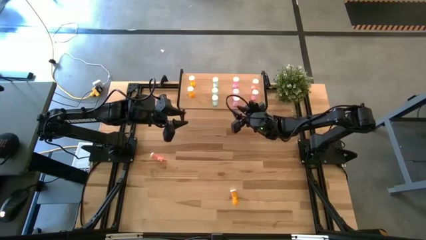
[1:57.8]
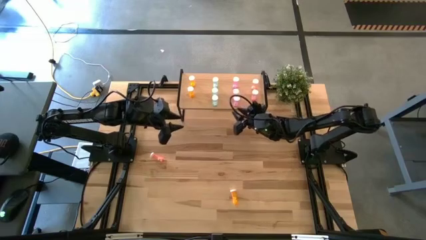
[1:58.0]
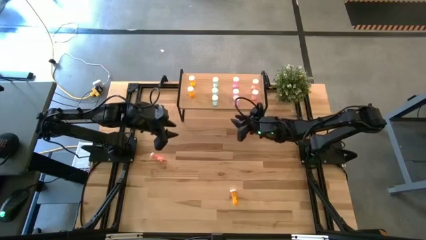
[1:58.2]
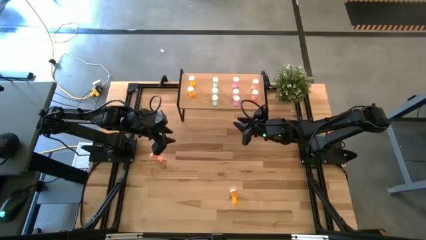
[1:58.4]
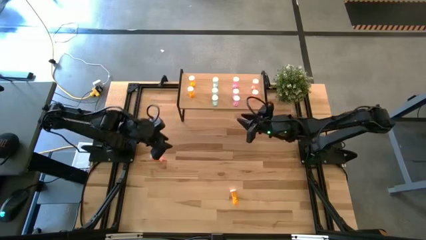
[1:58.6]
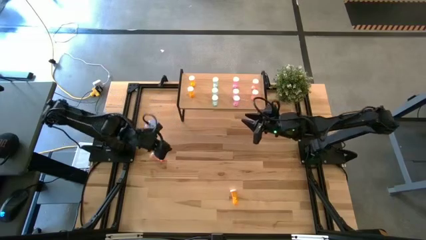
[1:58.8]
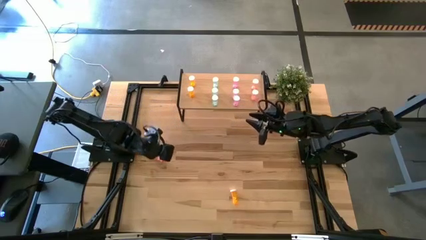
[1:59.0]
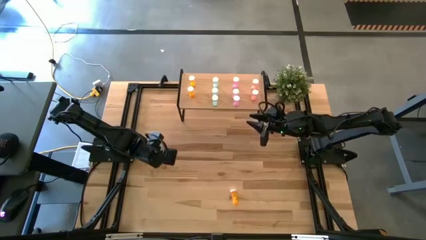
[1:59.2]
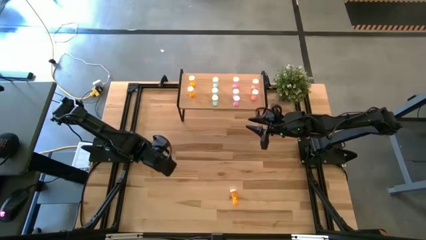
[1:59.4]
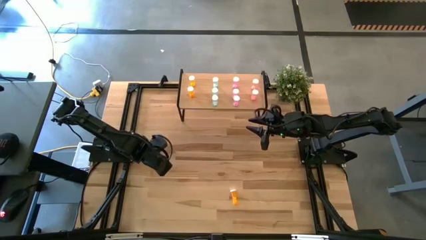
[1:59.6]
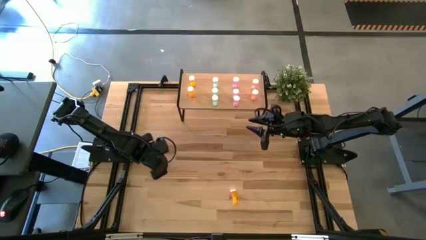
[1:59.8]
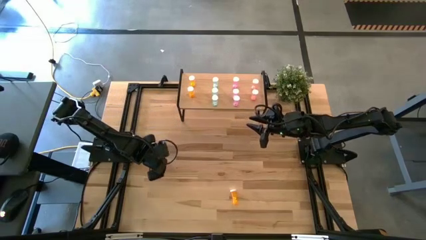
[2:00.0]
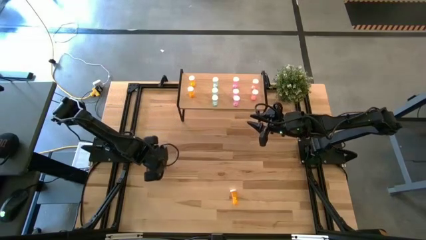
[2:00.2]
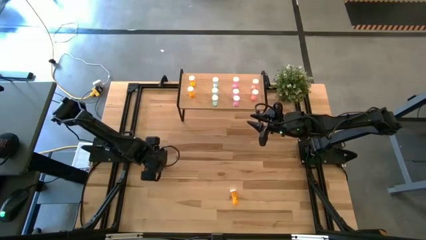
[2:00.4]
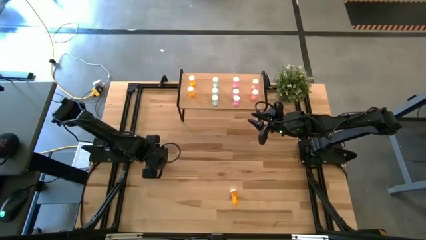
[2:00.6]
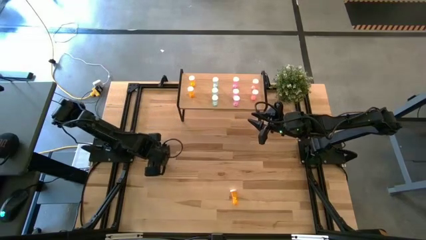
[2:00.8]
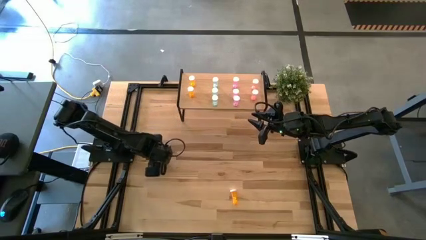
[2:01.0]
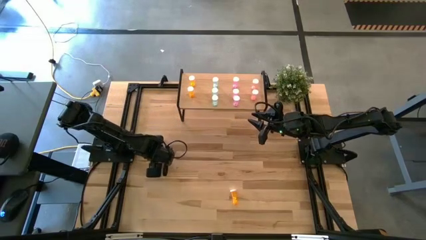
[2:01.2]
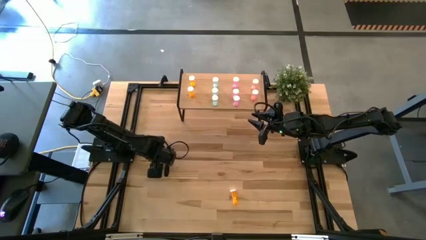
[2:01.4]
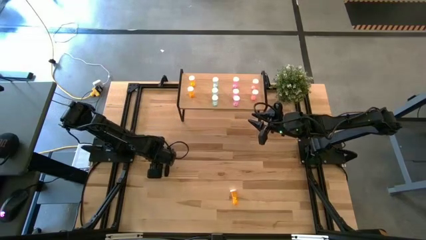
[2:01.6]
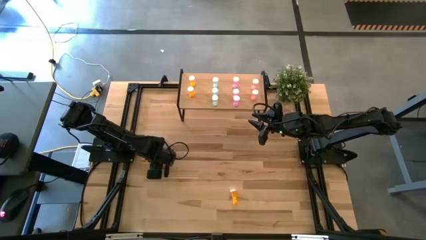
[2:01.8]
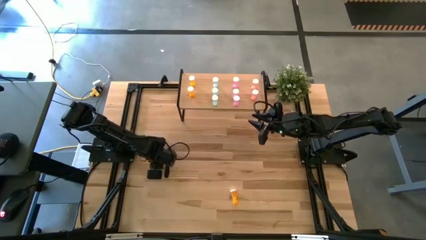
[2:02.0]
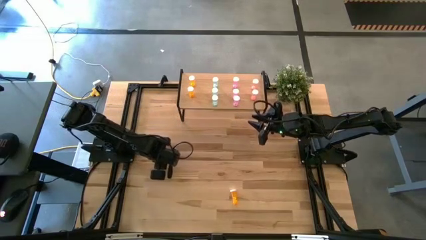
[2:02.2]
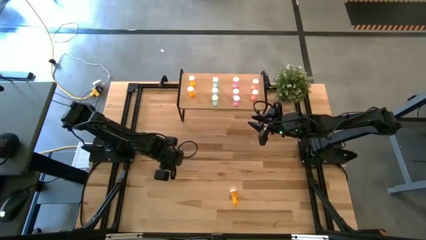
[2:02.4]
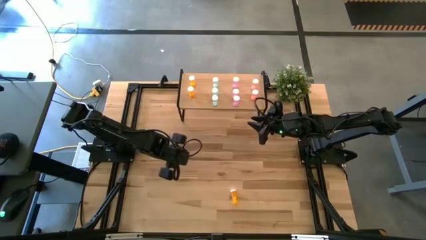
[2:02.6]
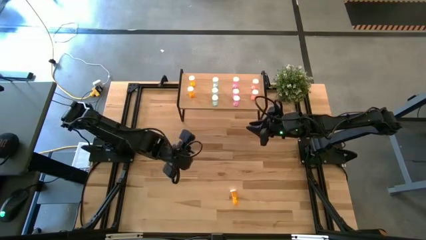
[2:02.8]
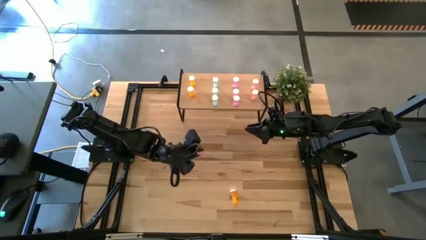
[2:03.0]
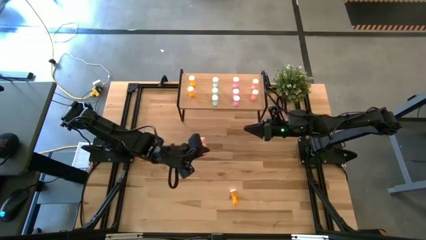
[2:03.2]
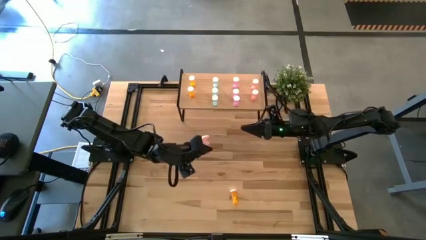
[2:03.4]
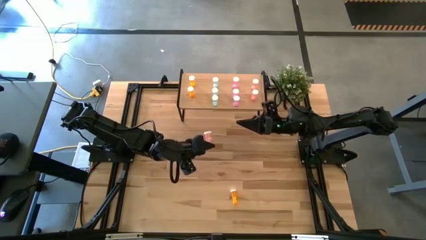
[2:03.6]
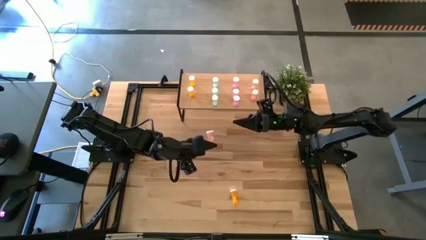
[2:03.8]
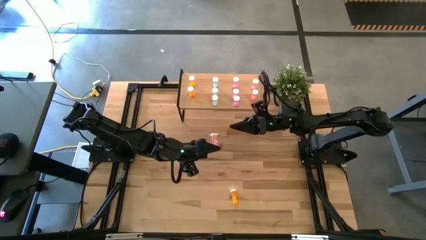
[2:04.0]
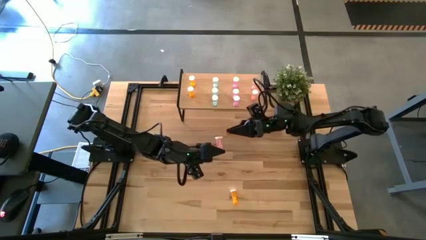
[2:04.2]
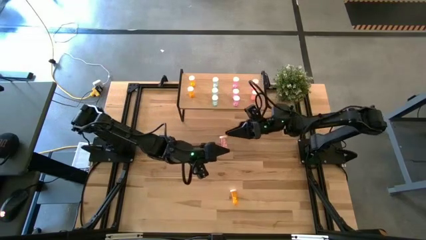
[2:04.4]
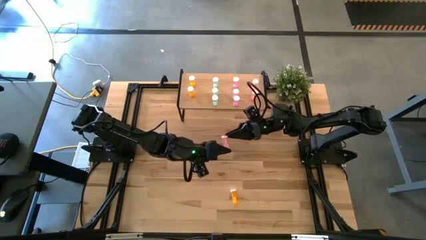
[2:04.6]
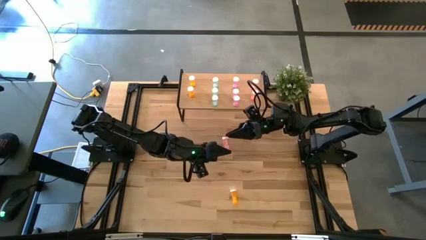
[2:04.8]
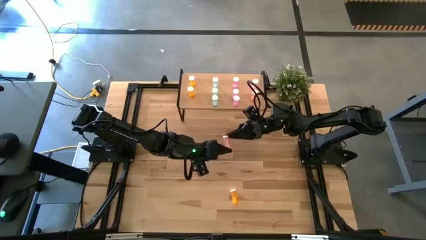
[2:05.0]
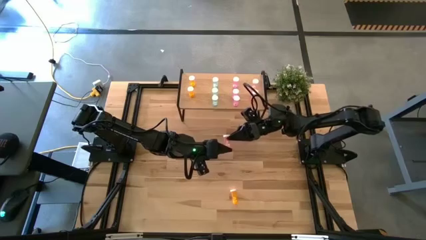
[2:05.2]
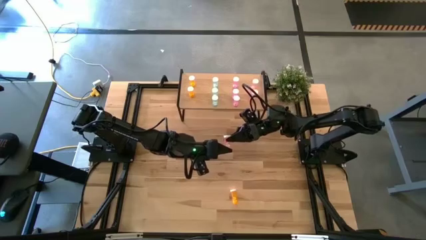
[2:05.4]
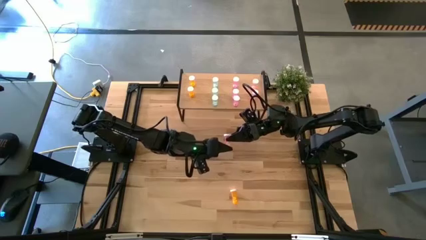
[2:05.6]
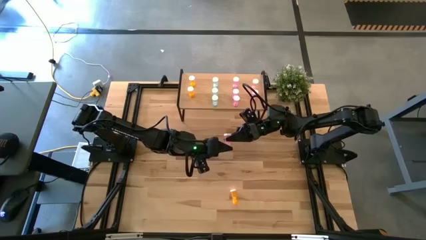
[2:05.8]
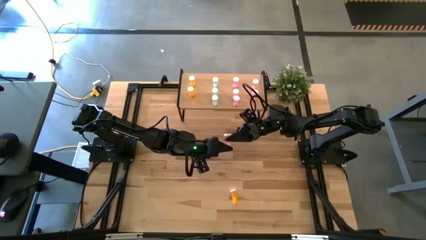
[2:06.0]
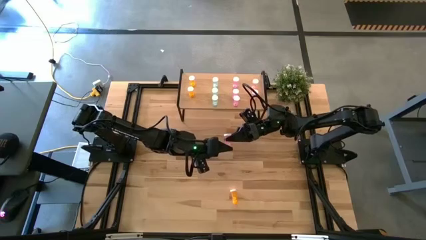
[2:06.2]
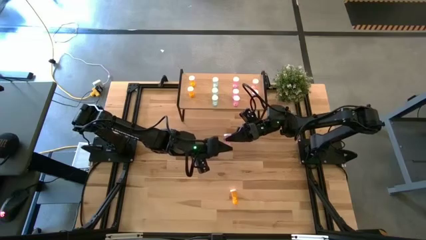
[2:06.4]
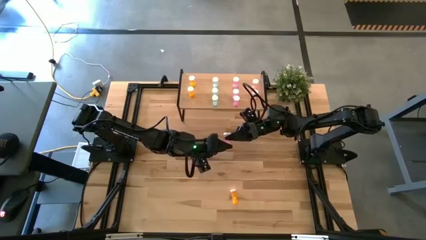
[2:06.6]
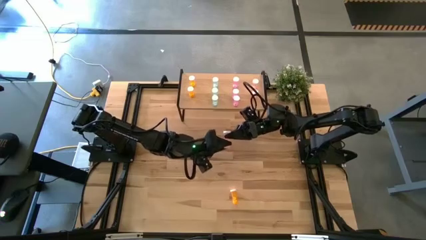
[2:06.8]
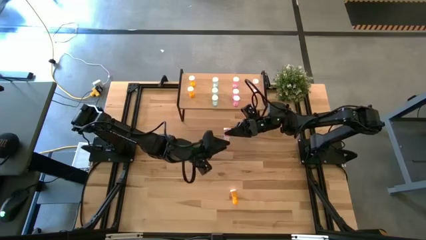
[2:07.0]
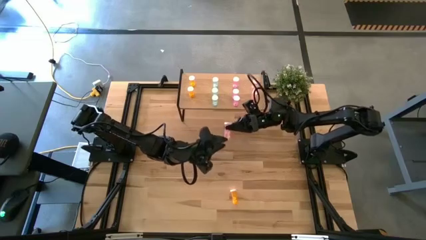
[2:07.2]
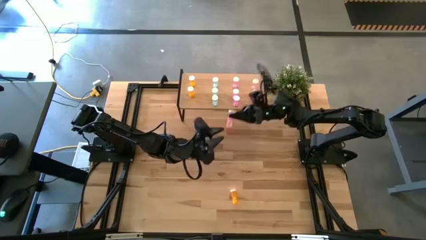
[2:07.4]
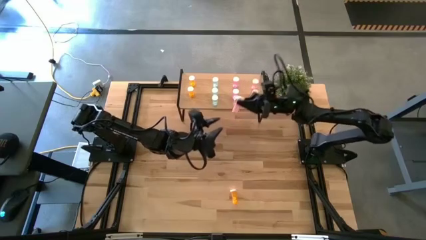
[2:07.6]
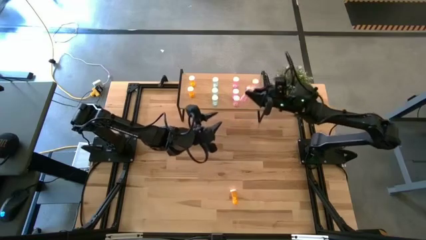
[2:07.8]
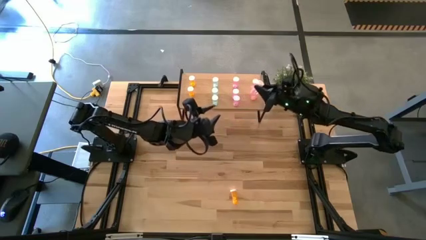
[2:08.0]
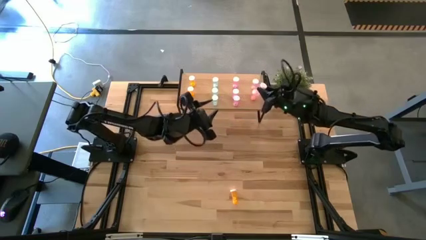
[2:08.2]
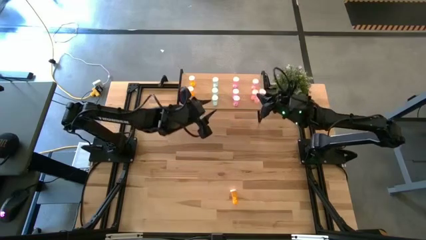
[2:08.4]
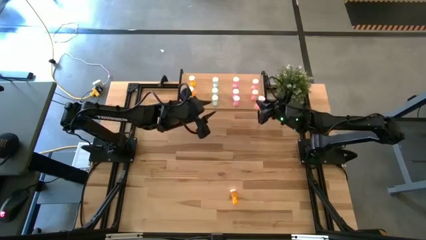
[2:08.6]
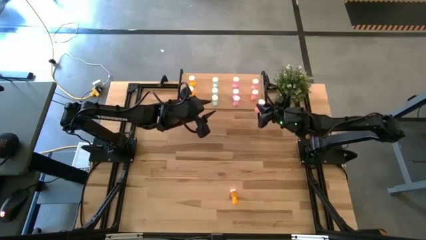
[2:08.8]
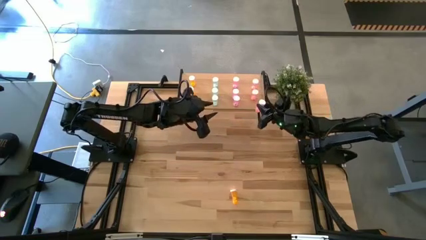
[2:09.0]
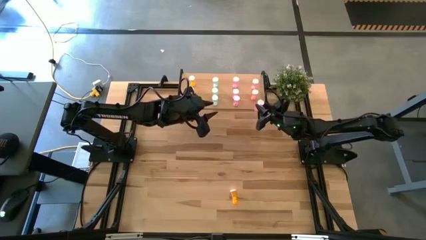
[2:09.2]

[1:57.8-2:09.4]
Task: Pick and place medicine bottles onto shelf by color
Put the pink pill bottle aligned with the other pink pill bottles

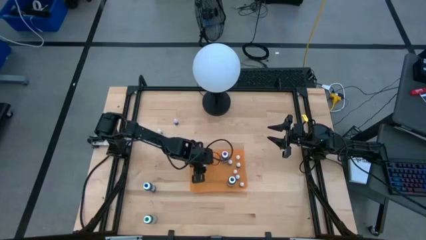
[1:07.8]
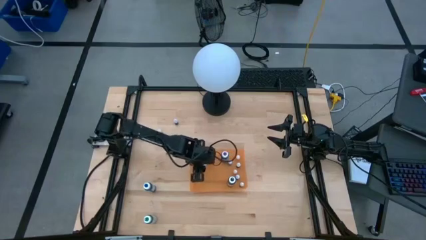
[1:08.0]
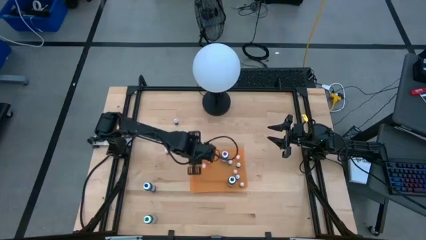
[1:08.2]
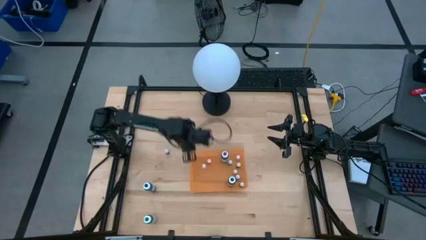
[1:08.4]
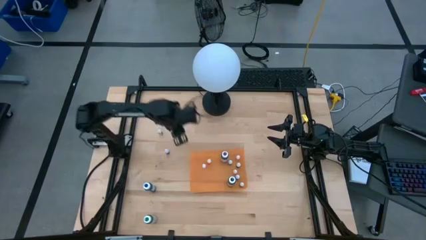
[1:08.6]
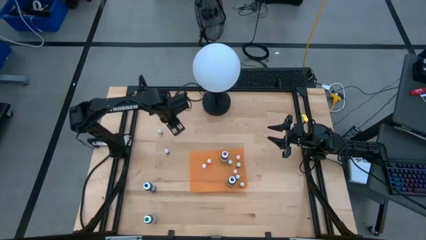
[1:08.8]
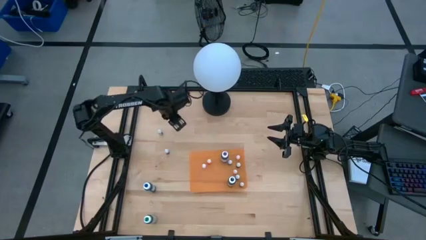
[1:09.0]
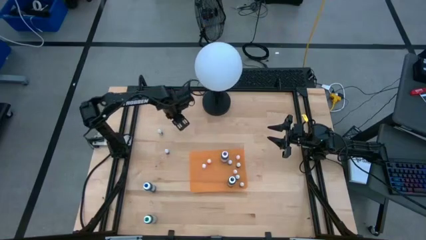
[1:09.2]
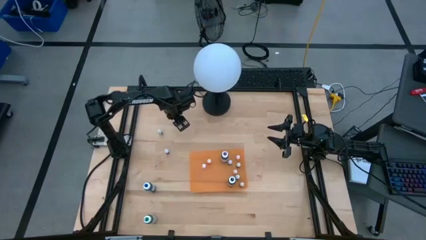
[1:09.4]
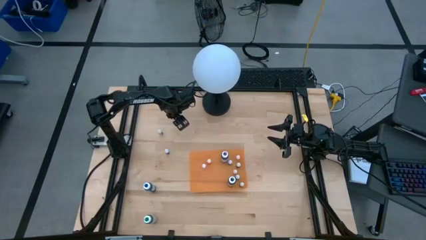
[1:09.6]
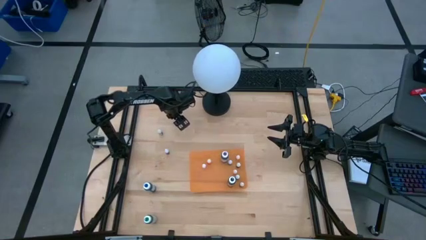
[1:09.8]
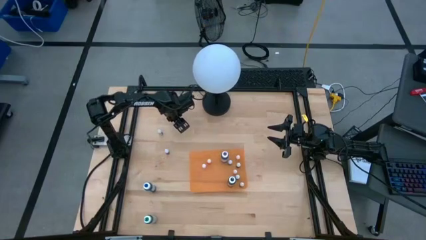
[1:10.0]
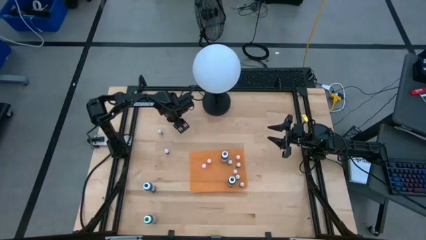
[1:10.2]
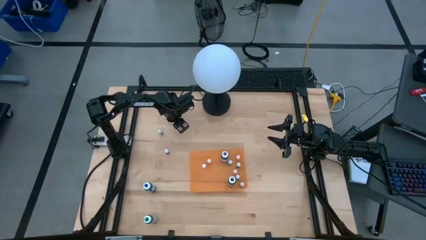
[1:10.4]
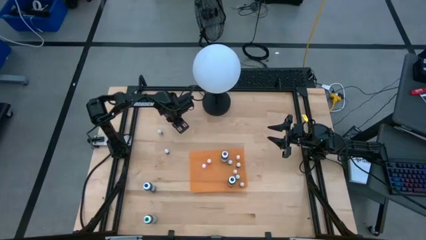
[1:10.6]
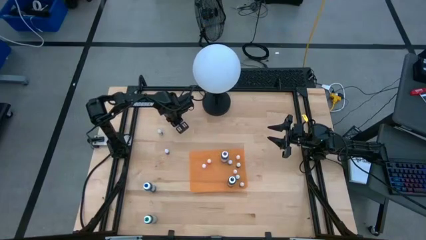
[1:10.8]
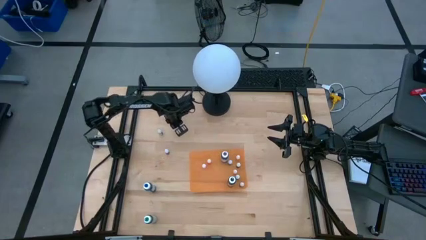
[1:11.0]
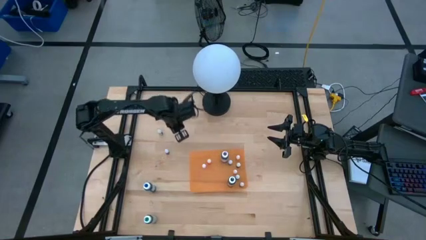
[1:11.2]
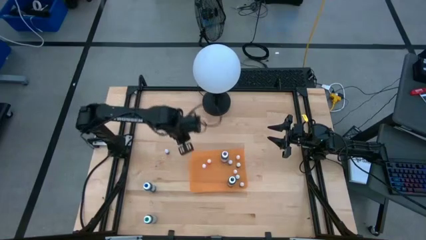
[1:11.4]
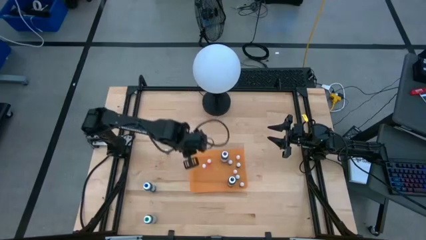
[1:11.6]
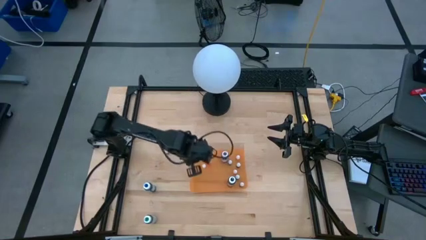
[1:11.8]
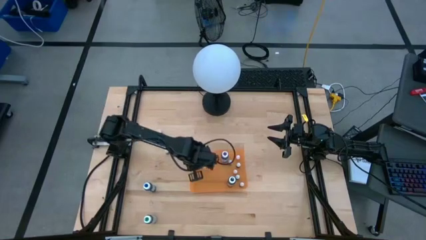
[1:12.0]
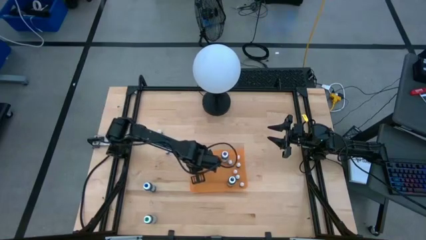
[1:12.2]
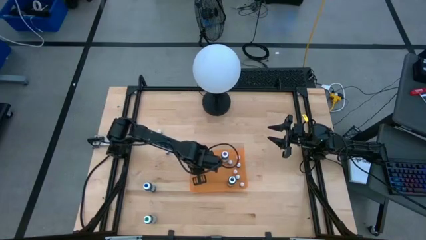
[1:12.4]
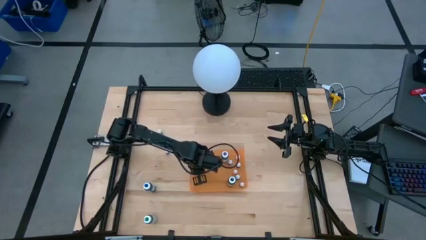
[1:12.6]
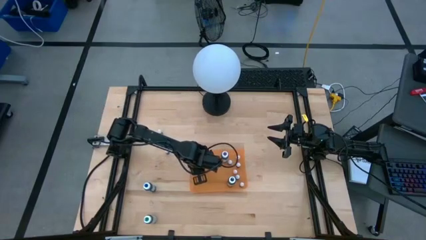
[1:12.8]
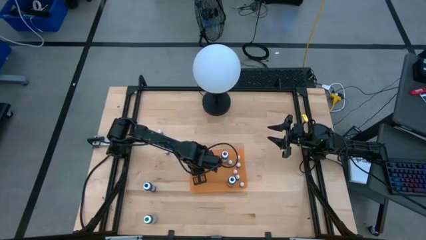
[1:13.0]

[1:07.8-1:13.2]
Task: Pick & Place food coloring
Put the small blue food coloring bottle into the orange container
